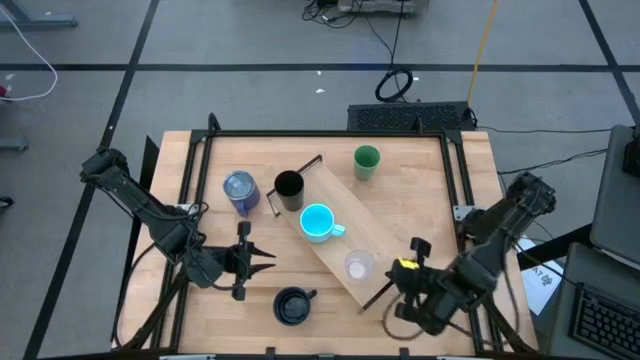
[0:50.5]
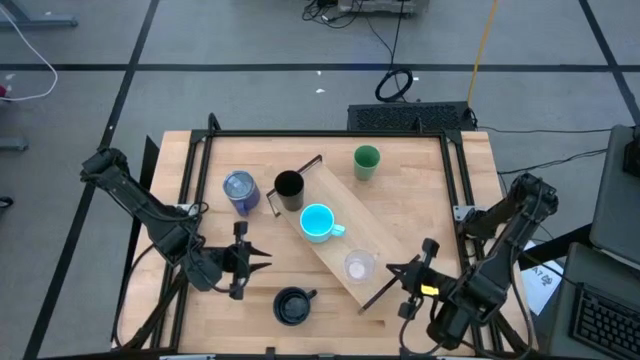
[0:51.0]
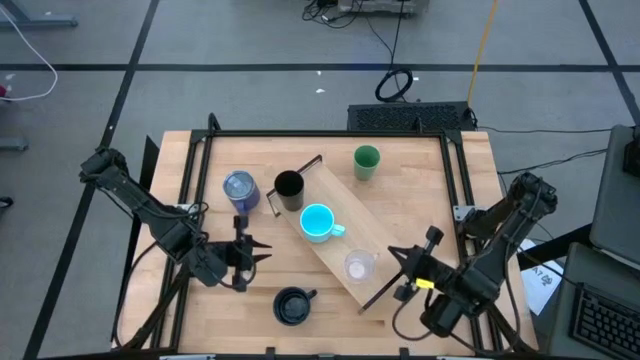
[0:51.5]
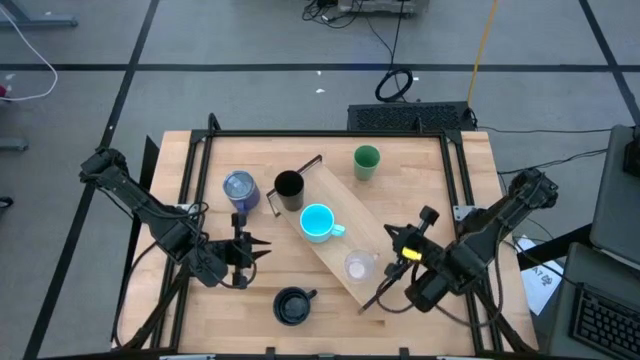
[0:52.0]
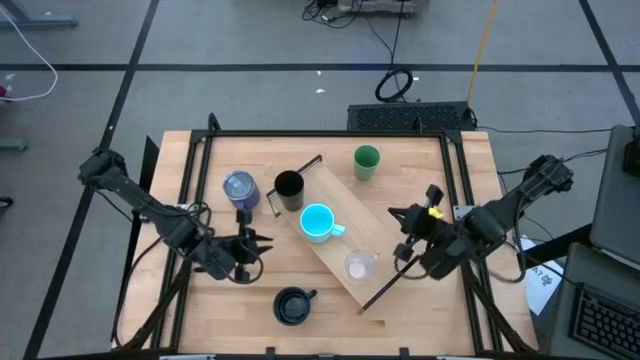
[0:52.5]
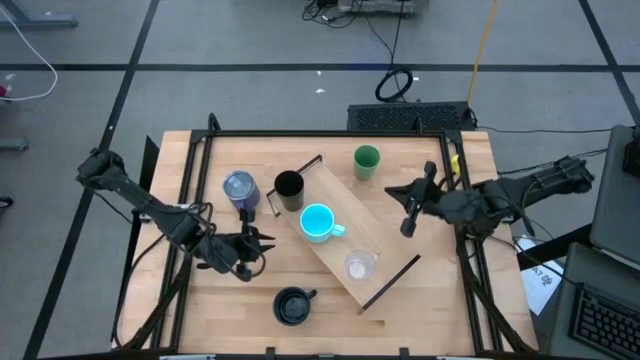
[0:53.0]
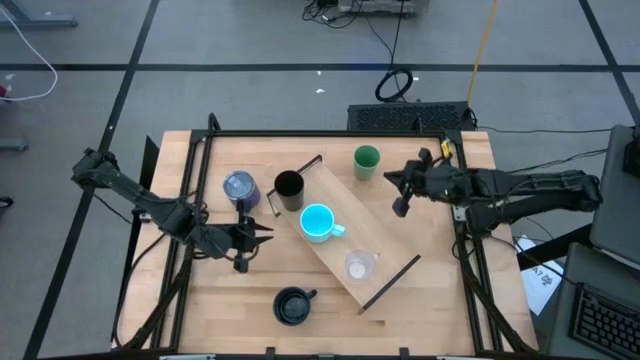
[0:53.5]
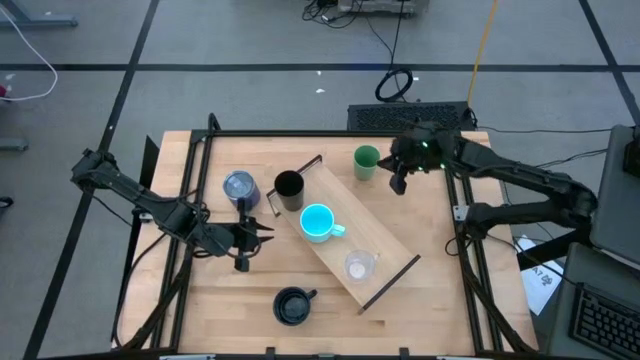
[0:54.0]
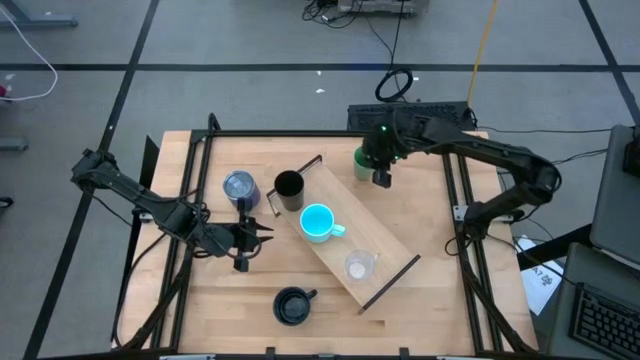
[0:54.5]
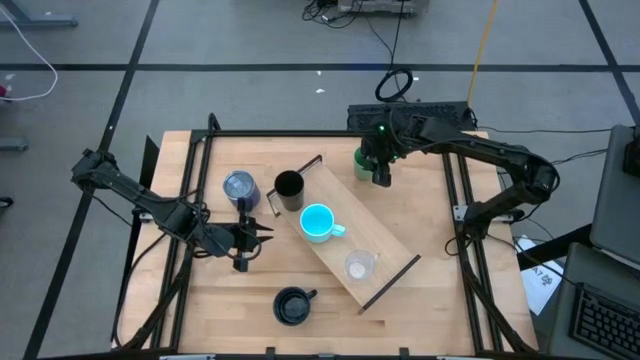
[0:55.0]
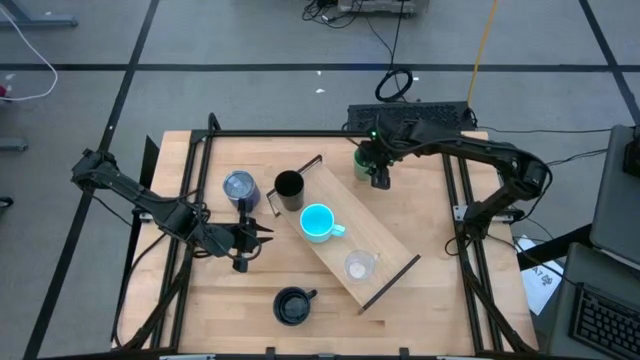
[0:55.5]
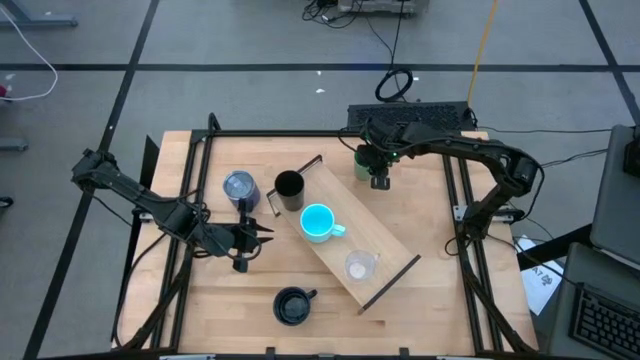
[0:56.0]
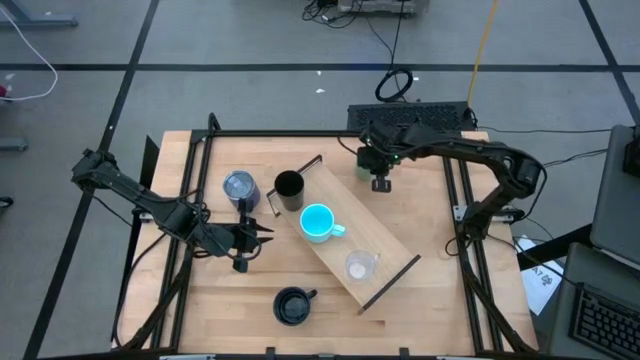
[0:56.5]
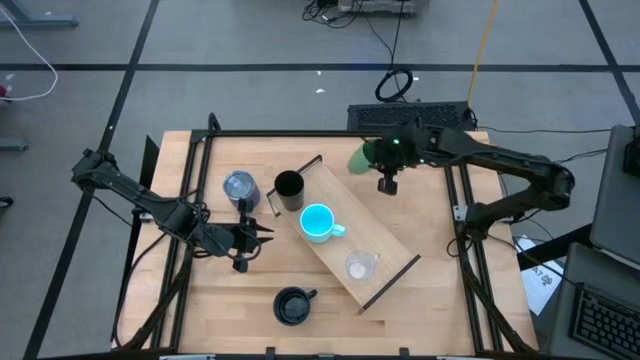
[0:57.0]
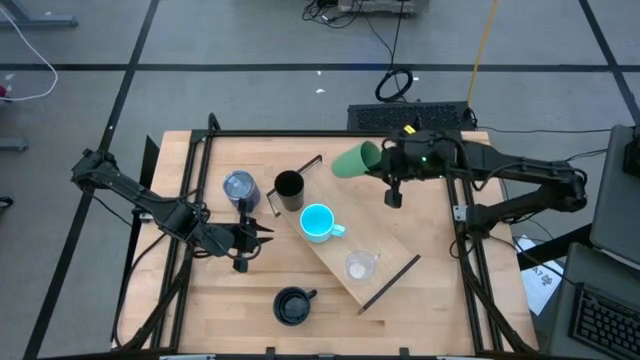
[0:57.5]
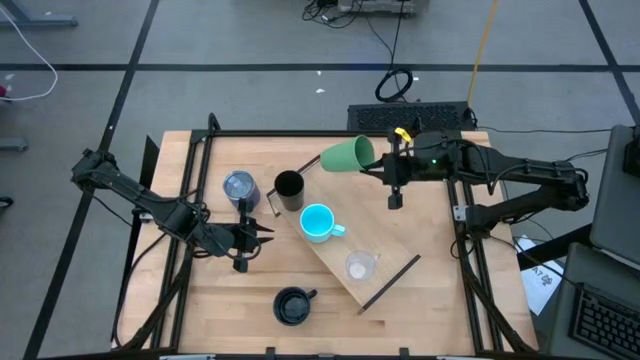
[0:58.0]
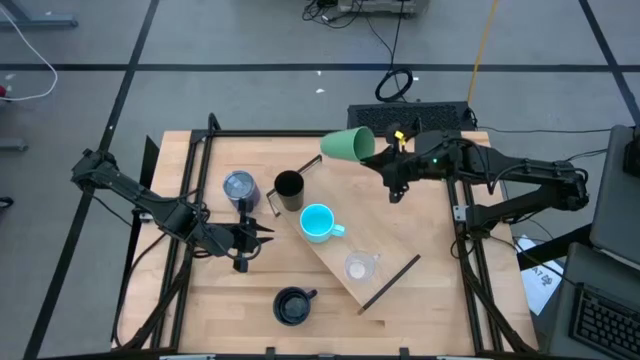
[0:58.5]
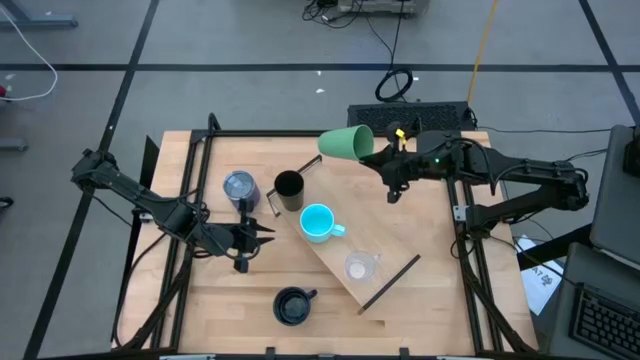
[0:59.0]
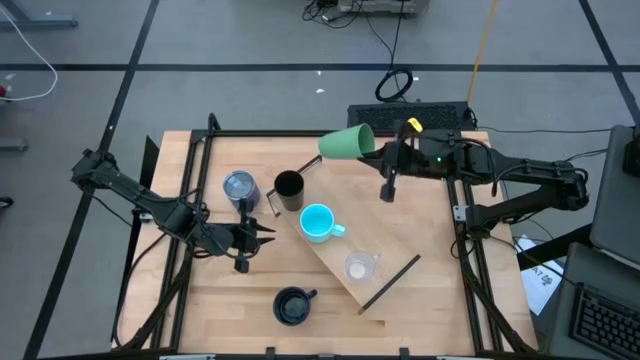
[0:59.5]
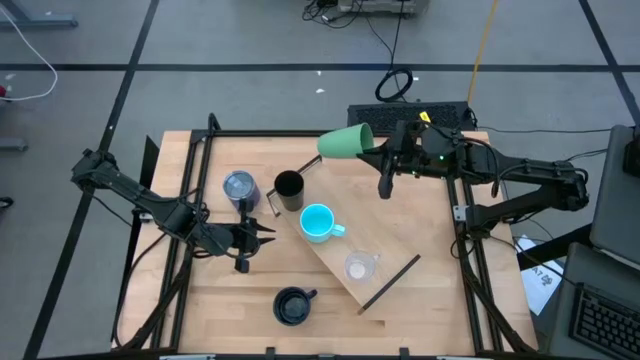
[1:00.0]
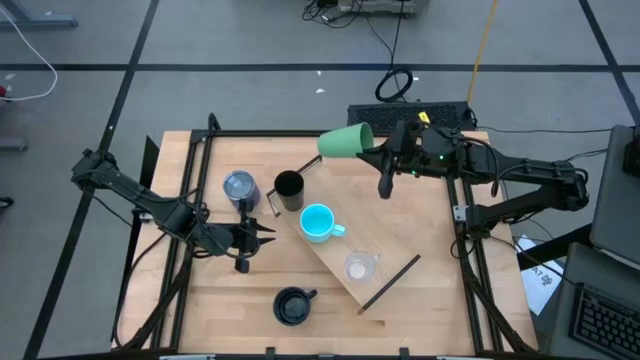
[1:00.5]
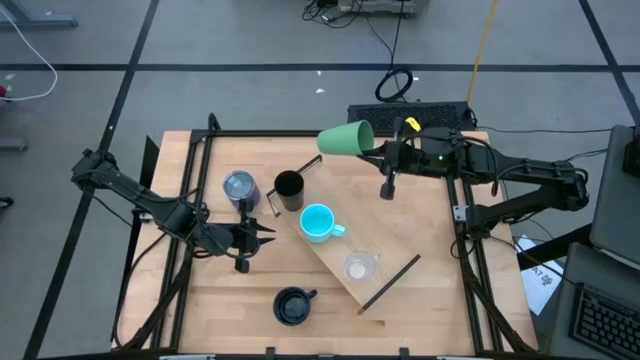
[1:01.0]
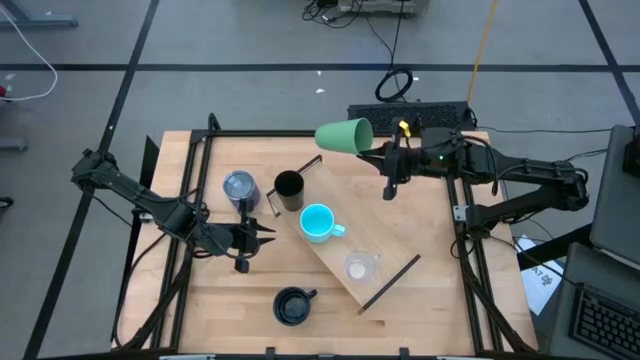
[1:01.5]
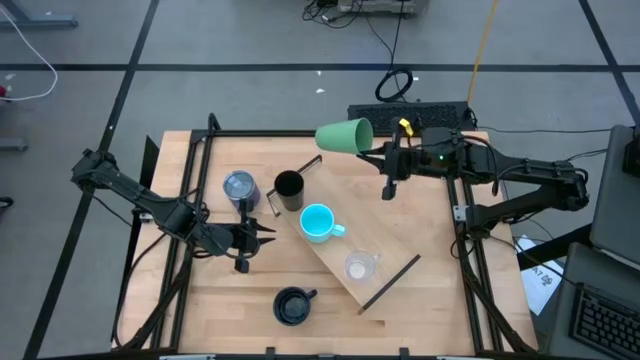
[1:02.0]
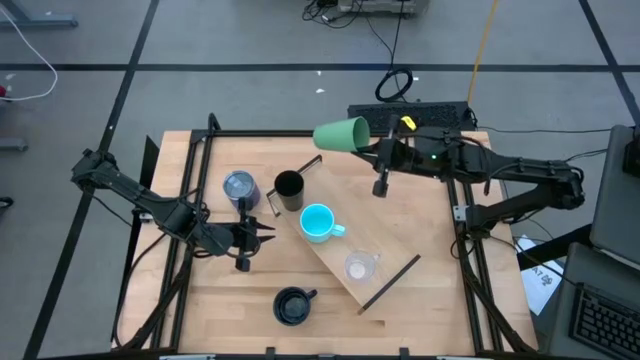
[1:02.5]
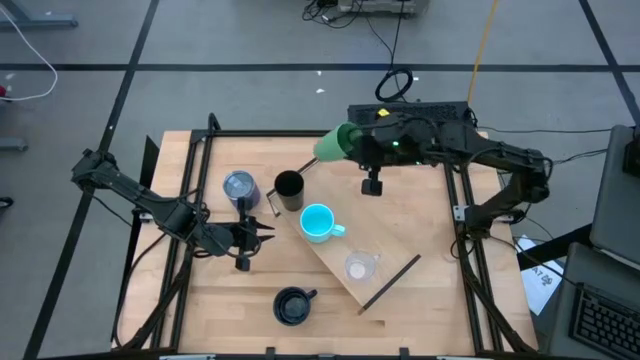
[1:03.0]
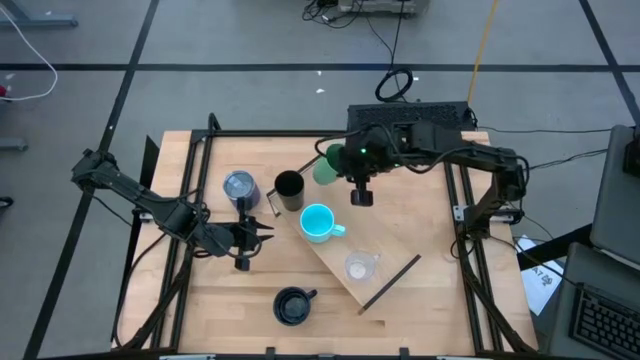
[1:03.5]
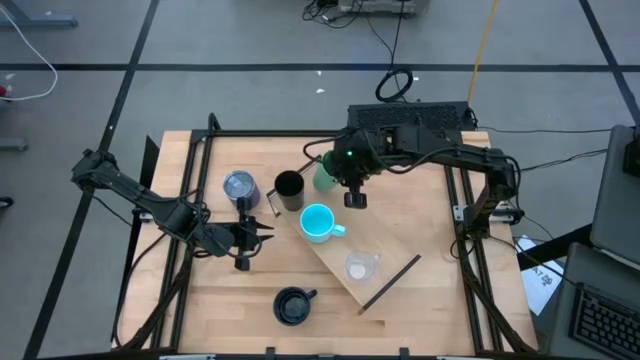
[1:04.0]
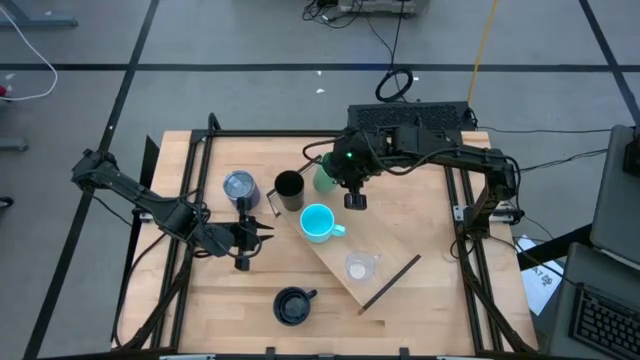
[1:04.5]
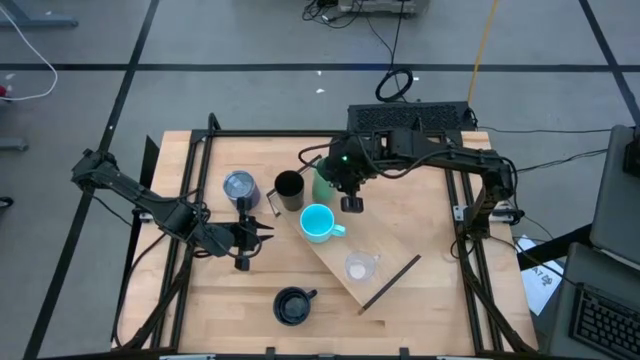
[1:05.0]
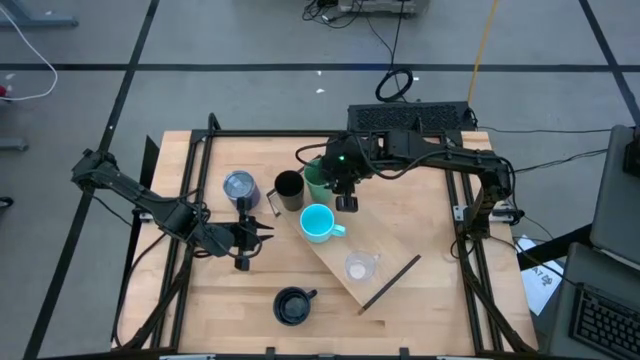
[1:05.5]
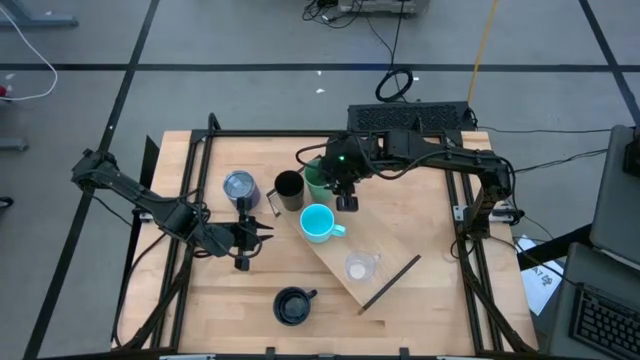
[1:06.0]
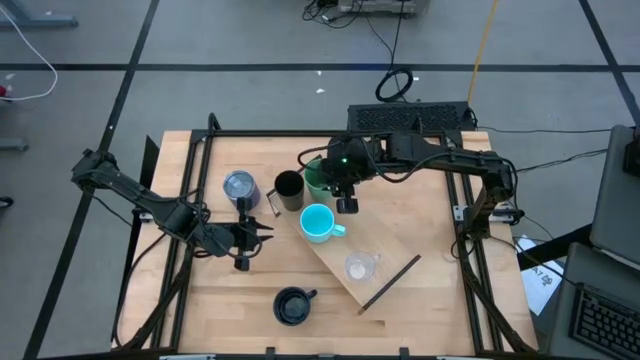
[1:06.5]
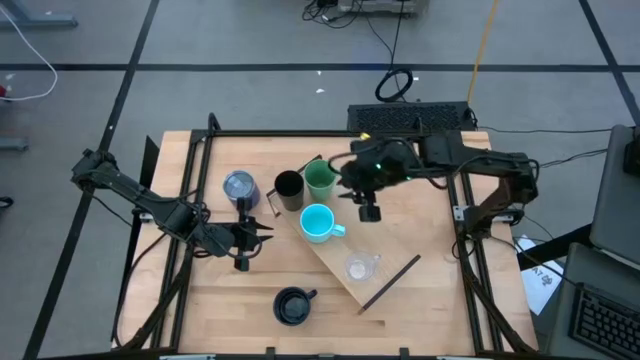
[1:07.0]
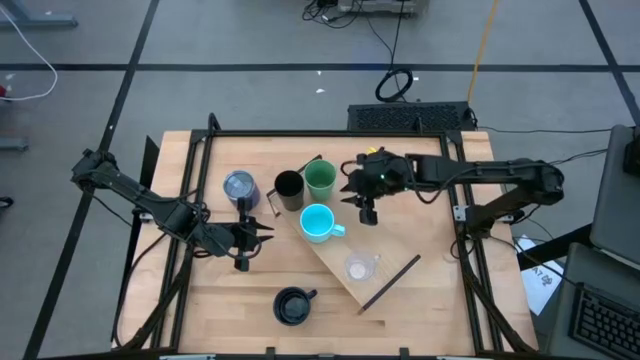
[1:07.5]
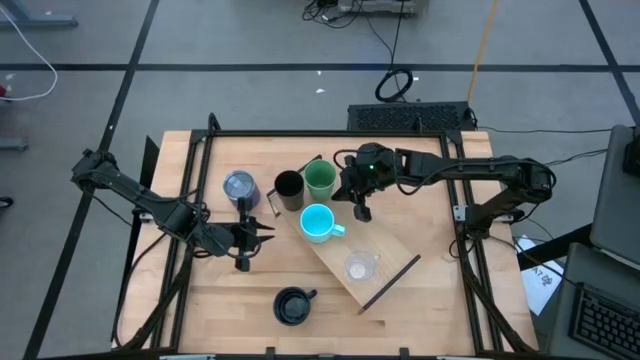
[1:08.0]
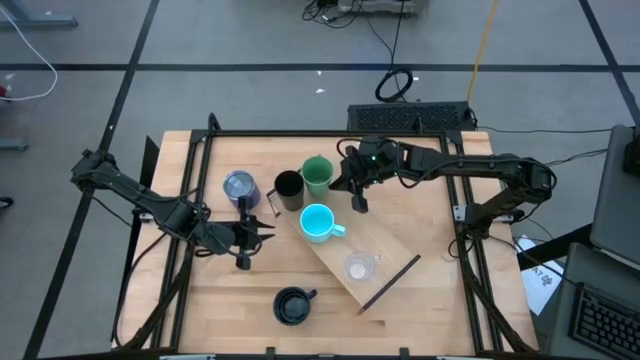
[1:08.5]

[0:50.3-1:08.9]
Task: Stack small to large cups/mugs on shelf
Put the green cup on the shelf

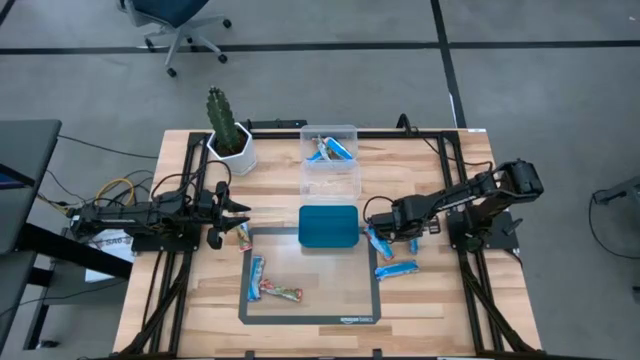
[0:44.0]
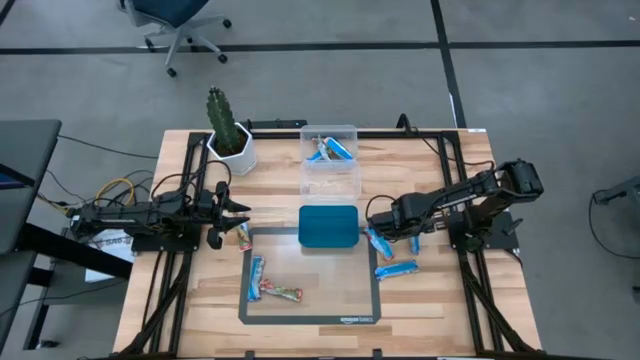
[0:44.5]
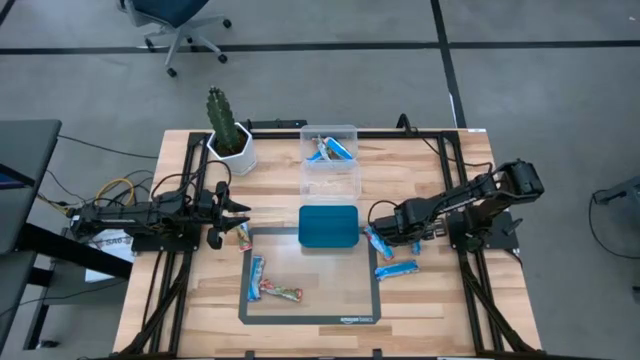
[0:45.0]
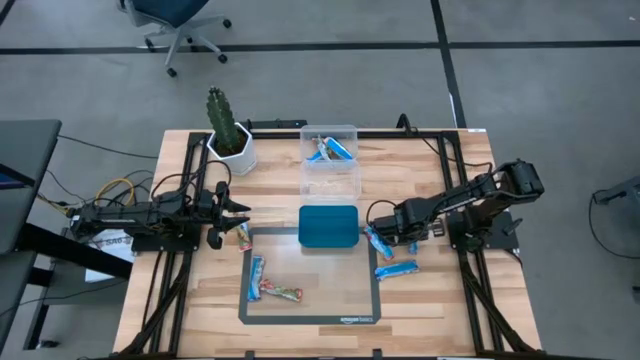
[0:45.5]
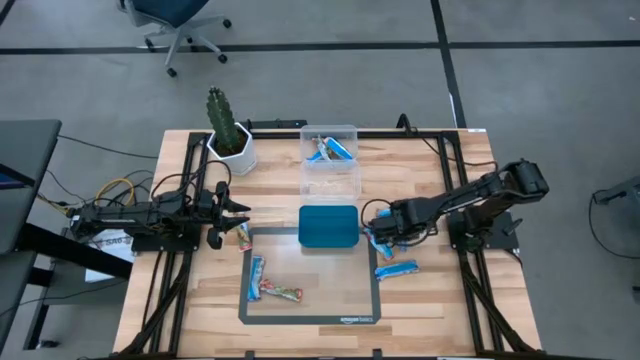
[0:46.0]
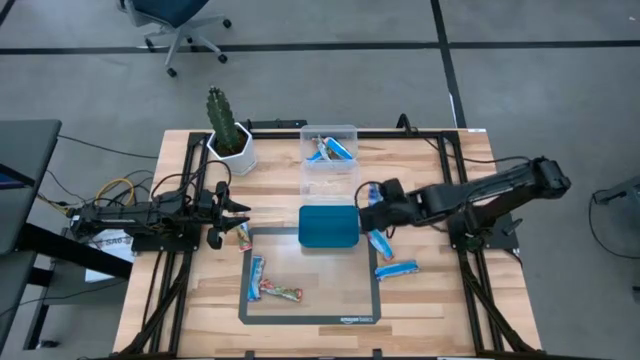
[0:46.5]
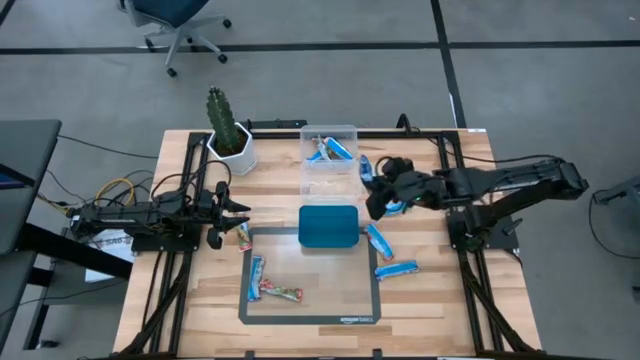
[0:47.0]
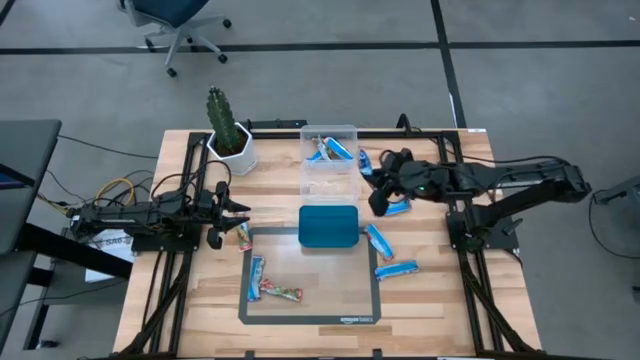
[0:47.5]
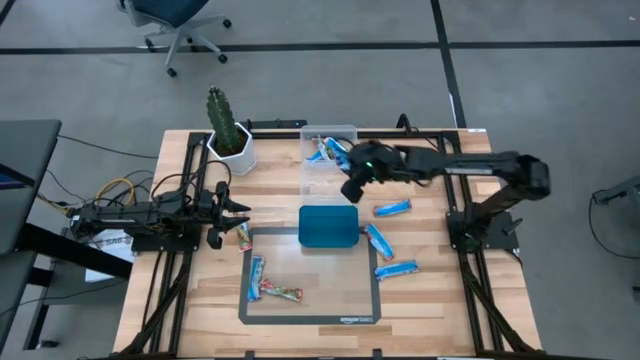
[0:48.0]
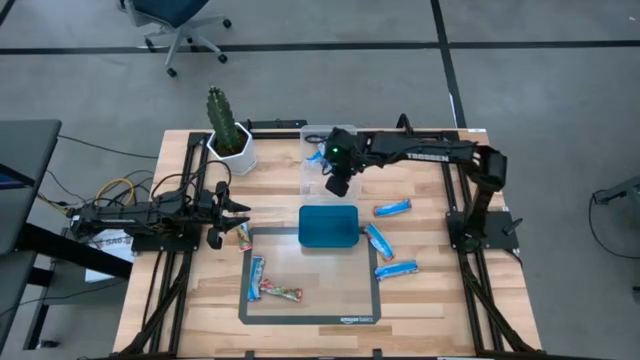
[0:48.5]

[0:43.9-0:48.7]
Task: Pick and place Granola Bars by type
Put the blue granola bar into the bottom transparent bin
